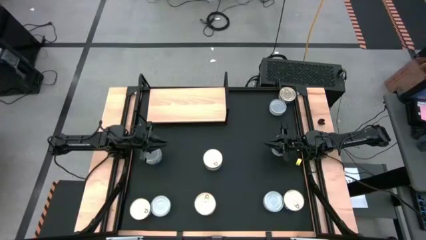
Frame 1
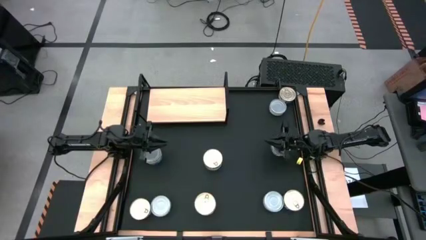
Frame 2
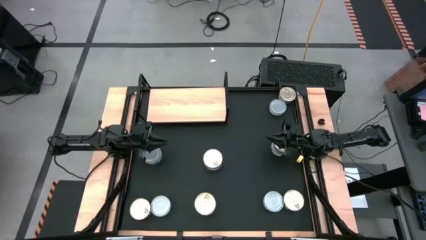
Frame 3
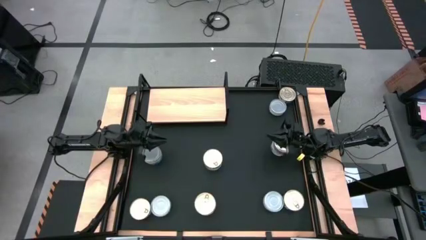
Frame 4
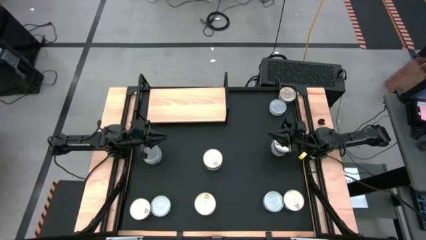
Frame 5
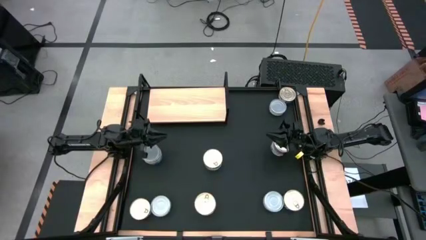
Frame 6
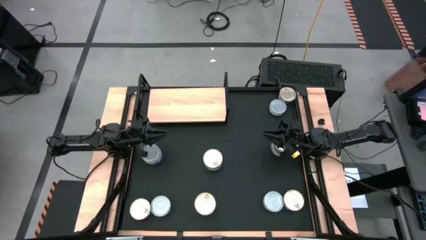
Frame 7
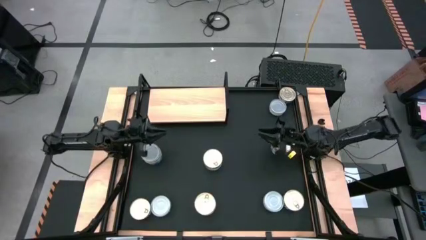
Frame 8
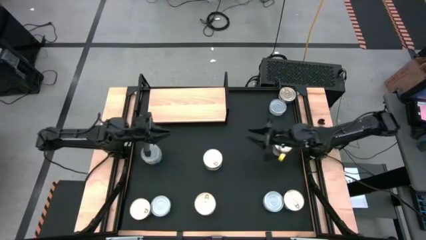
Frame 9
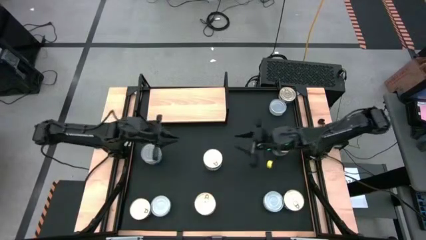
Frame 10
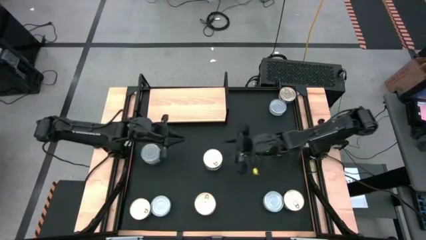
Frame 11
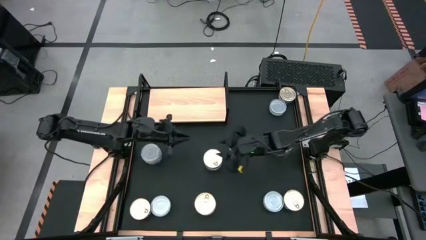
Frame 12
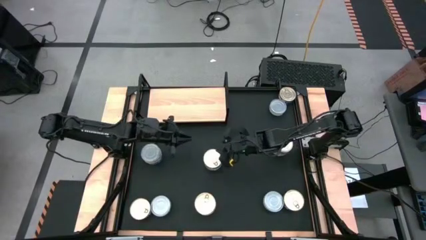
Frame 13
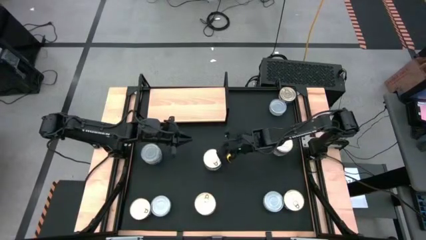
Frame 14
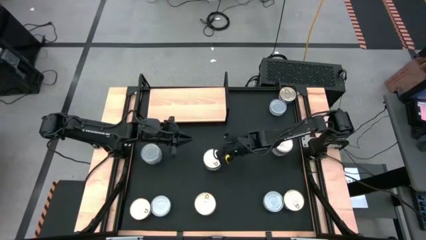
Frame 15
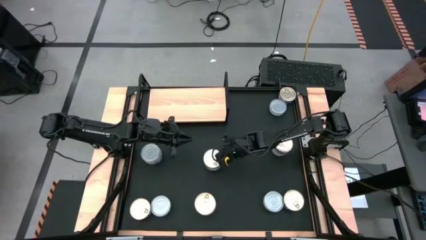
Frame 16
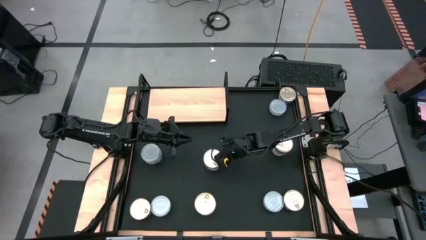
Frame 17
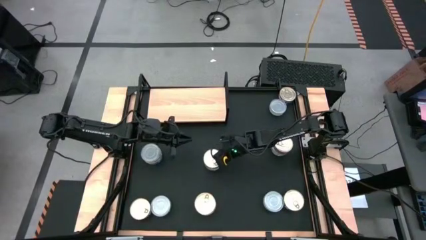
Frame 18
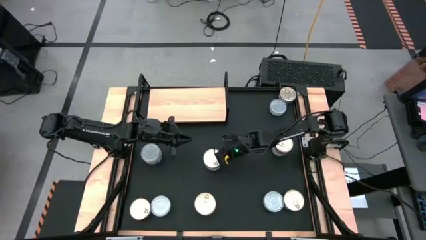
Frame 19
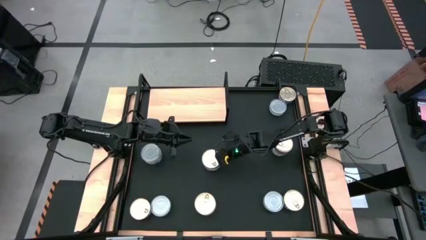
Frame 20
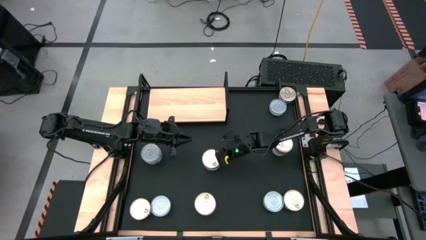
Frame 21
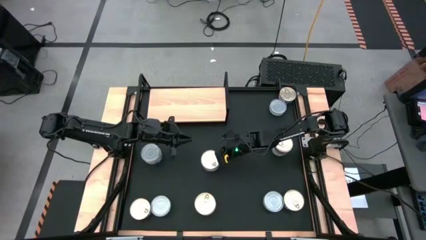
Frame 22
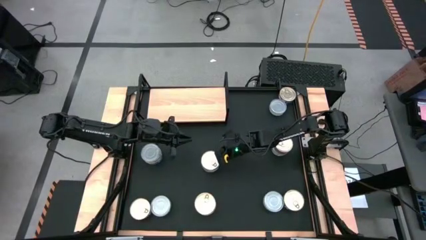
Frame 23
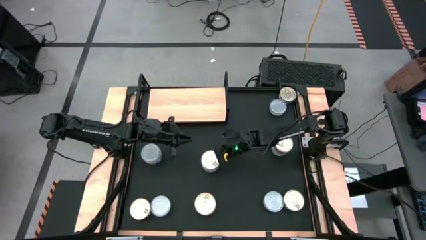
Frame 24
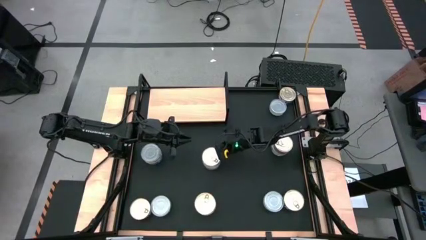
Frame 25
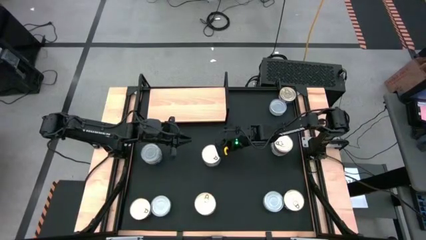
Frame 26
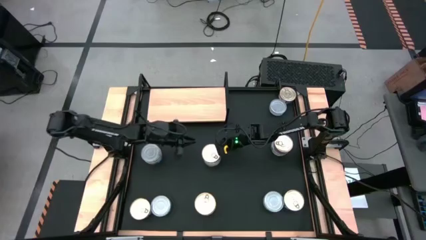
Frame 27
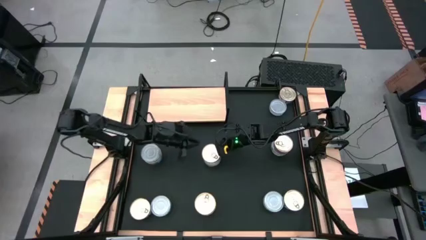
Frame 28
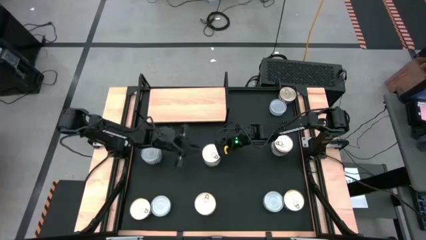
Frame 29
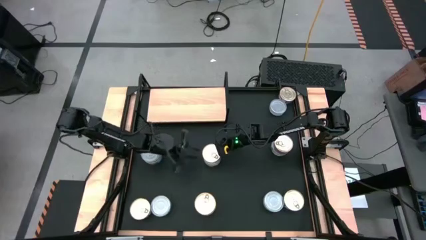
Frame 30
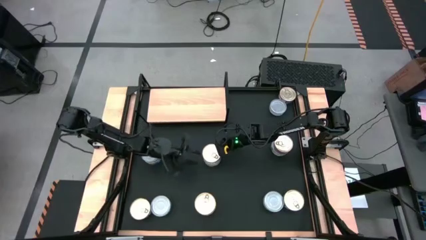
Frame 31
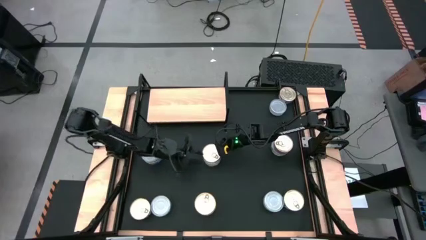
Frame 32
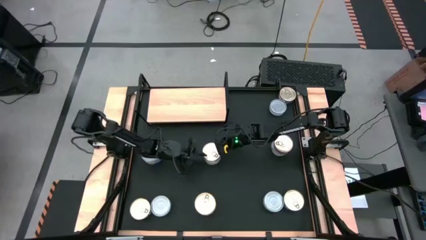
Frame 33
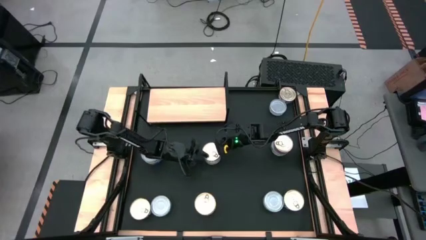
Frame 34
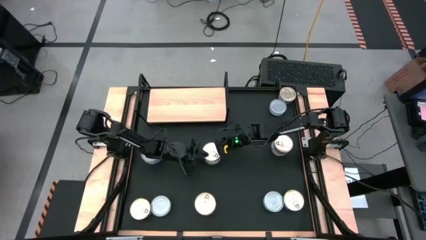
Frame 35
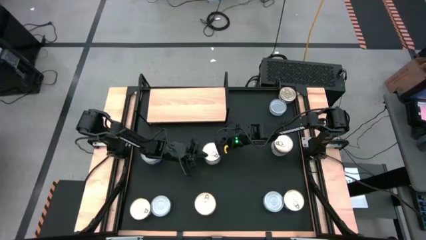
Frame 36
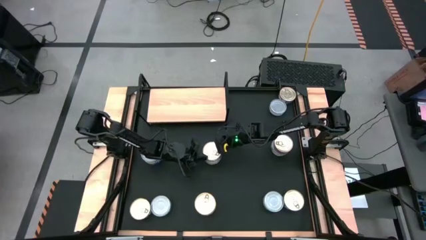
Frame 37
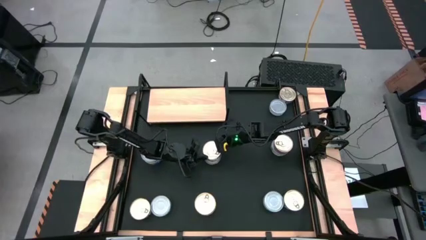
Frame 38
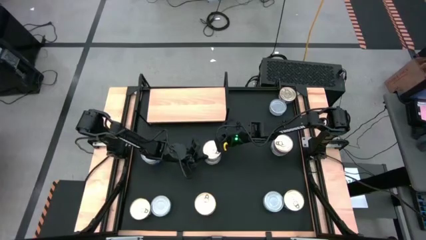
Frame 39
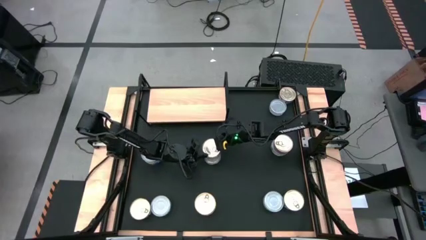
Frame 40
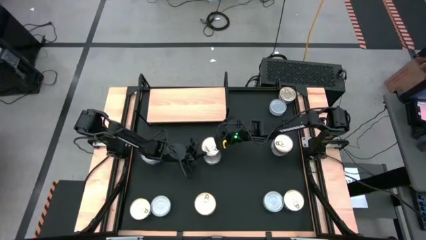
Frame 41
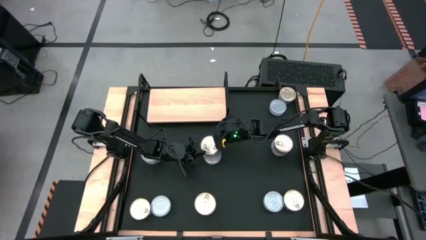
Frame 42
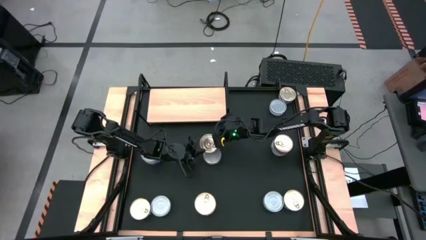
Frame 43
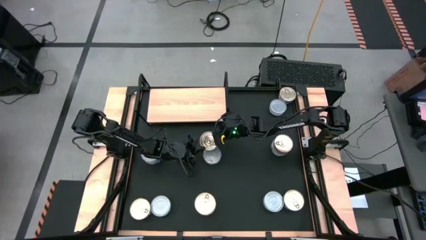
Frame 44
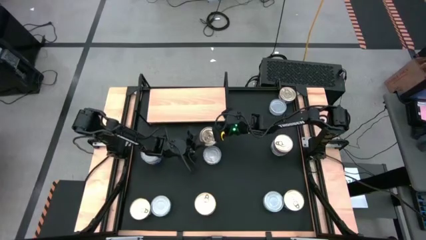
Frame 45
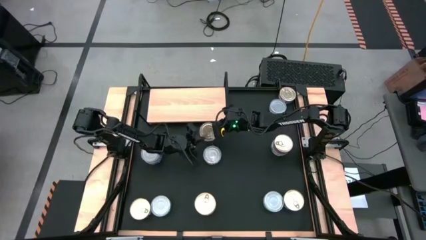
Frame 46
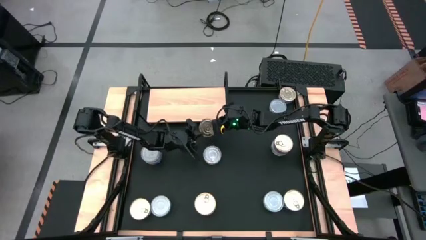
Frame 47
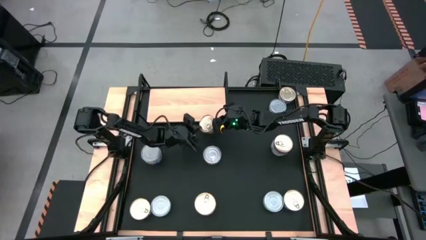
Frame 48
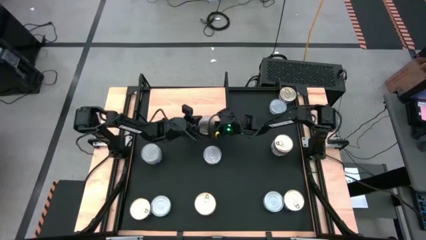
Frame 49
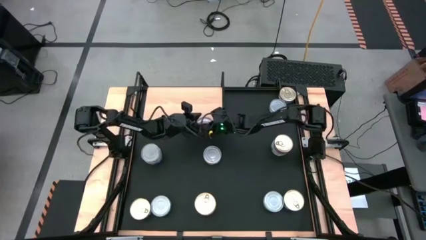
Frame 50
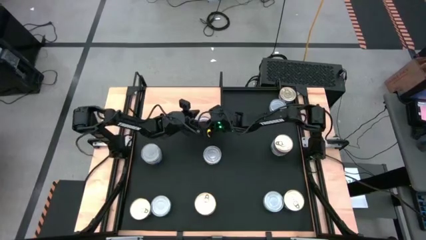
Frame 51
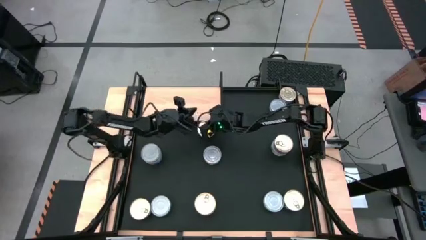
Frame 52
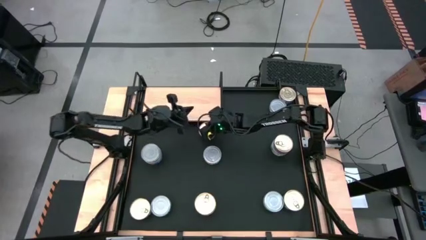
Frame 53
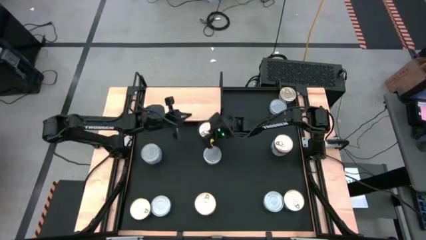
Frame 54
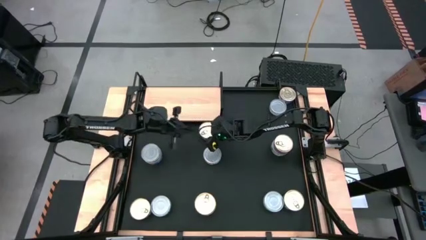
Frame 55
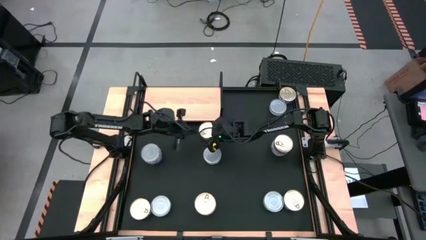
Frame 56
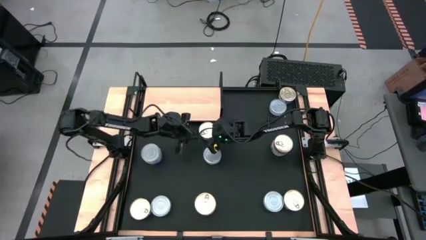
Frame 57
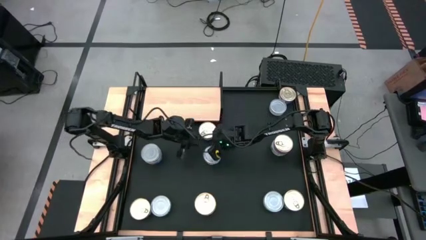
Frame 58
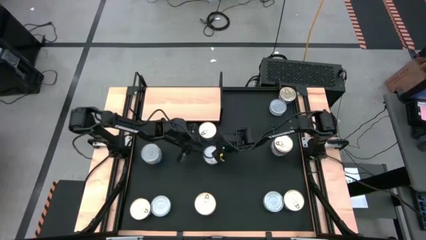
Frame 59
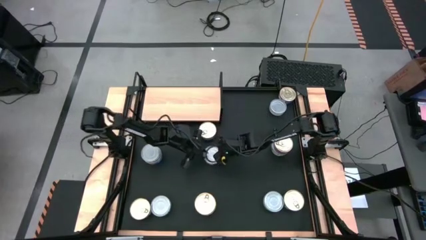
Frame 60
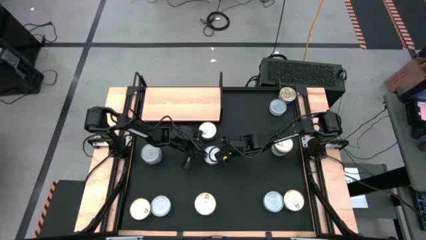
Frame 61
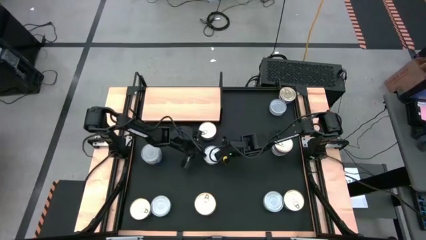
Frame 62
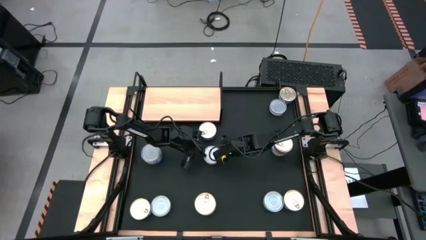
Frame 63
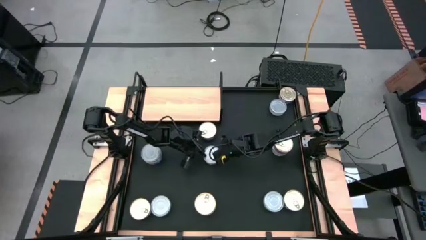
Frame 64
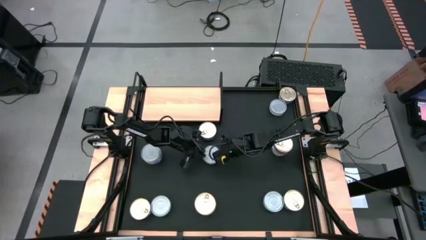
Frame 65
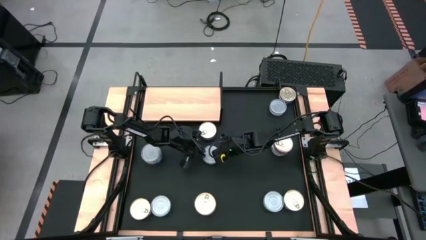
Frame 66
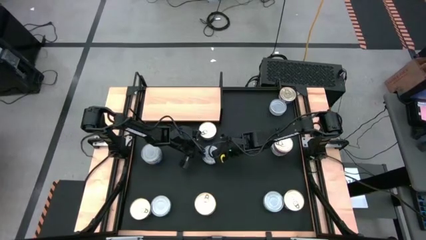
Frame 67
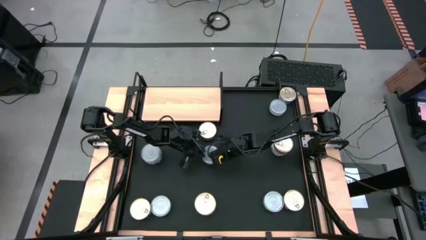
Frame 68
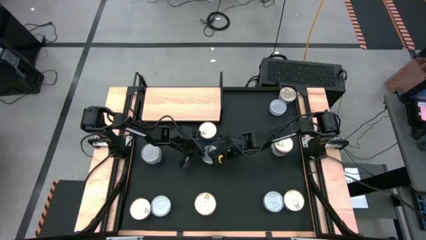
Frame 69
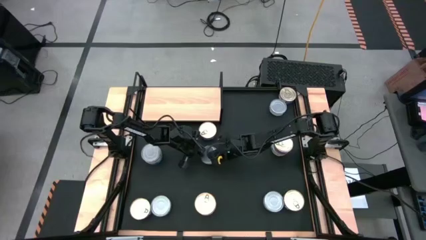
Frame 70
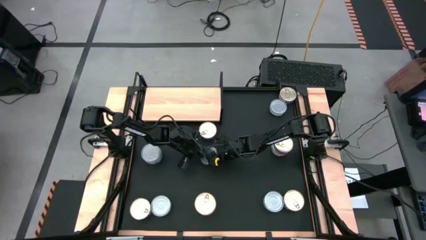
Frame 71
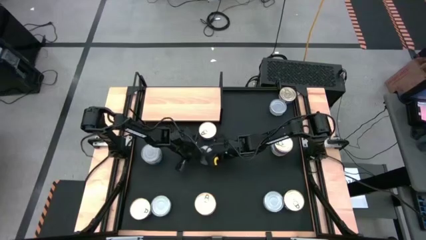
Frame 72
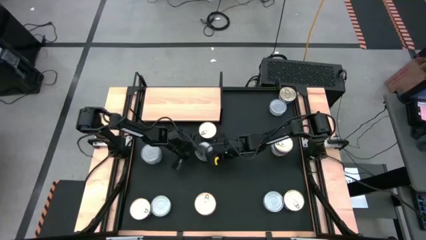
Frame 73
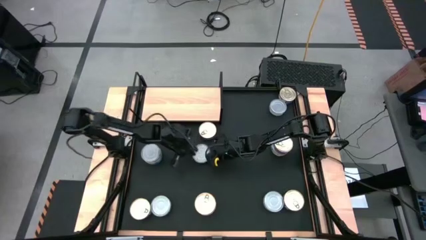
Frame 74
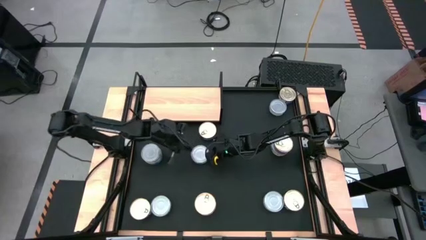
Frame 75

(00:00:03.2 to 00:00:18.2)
Task: Stack canned seafood by type on shelf
Put the green tuna can on the shelf
